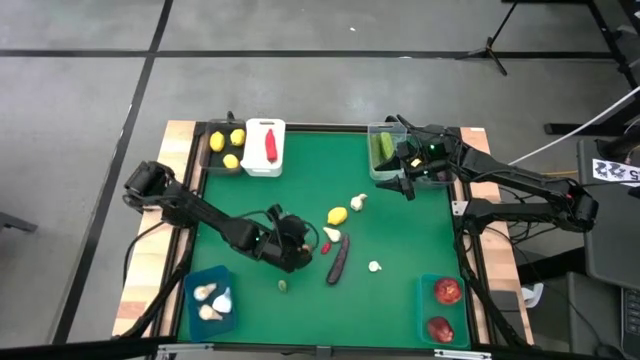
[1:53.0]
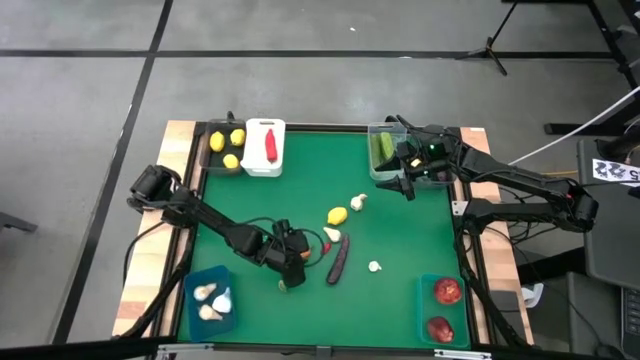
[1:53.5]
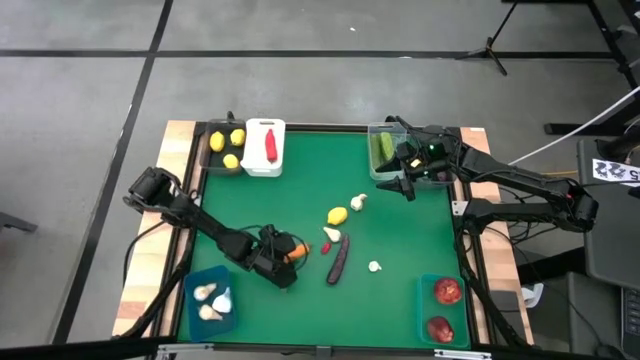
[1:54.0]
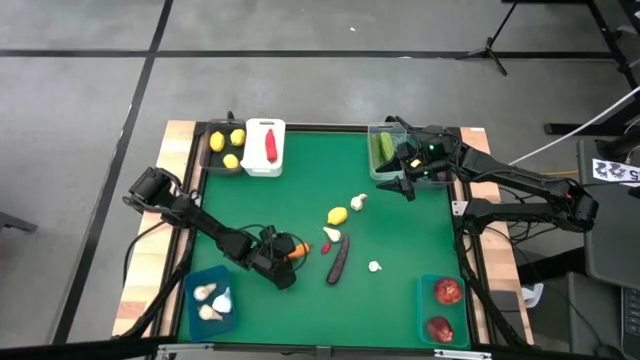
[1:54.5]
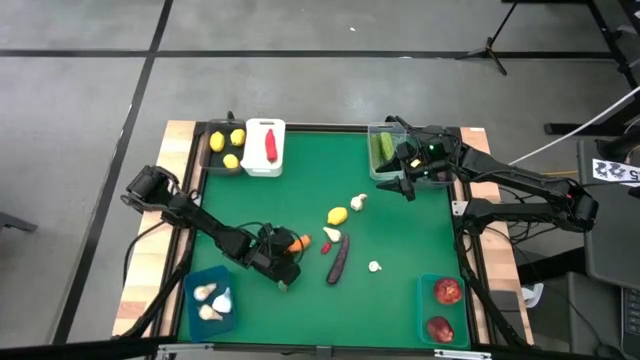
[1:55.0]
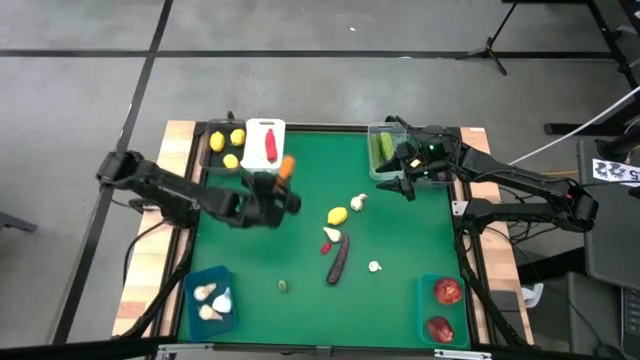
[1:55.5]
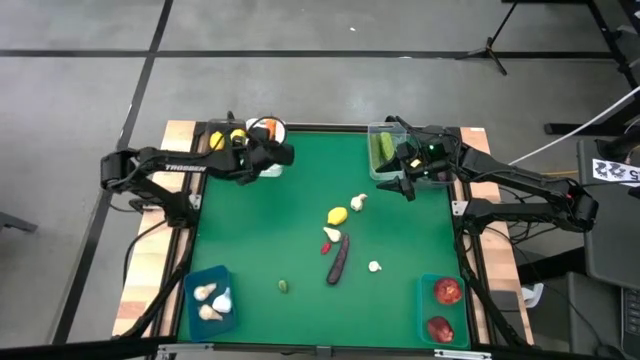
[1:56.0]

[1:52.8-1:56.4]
Task: Sort produce into baskets
Put the orange chili pepper into the white bin

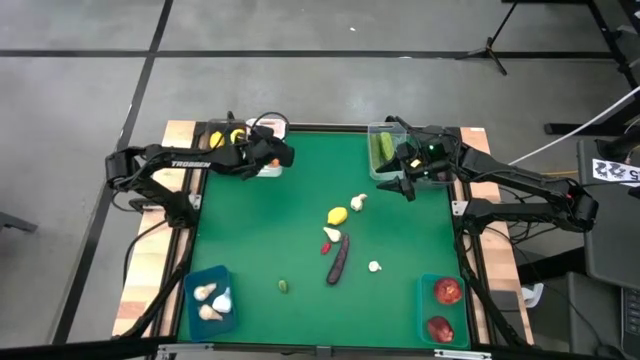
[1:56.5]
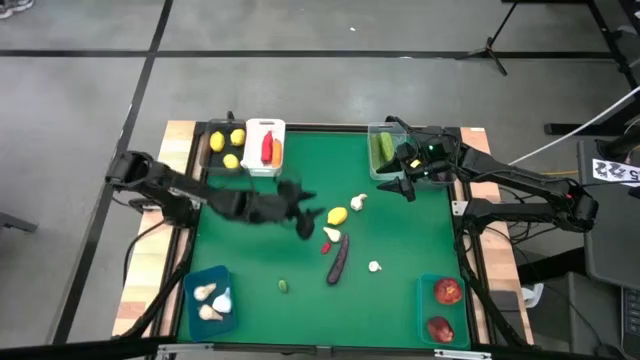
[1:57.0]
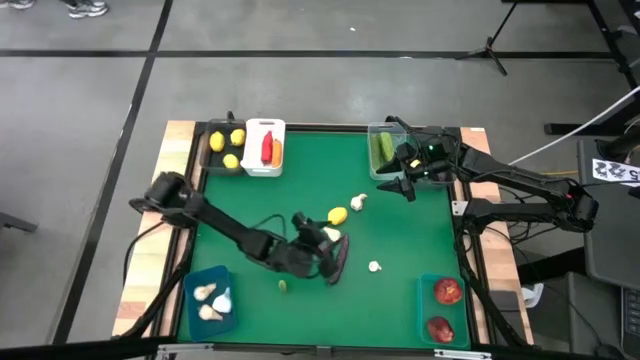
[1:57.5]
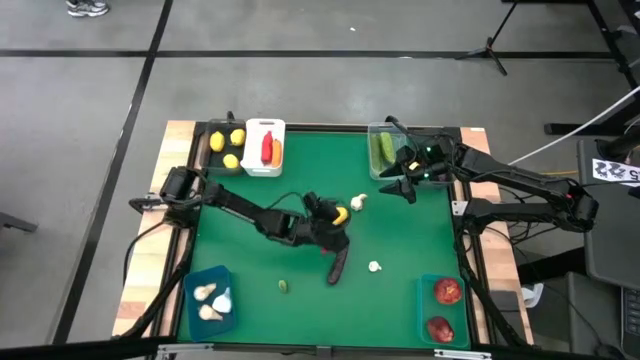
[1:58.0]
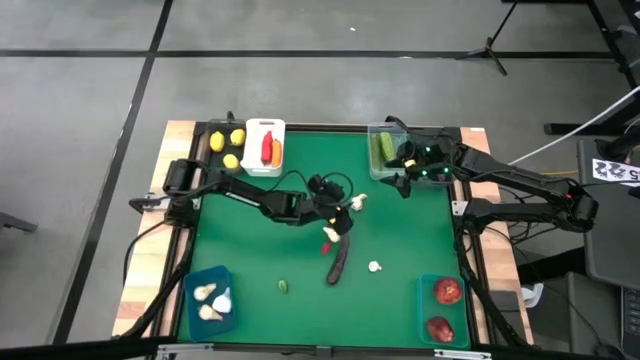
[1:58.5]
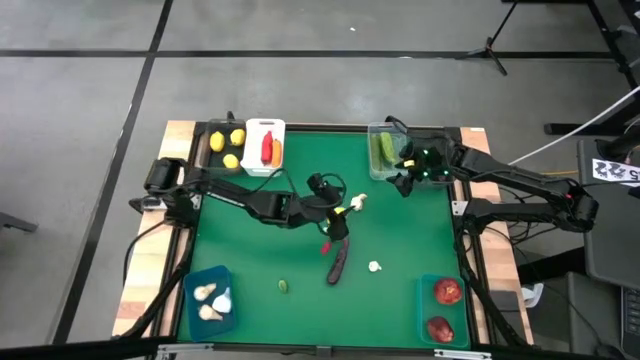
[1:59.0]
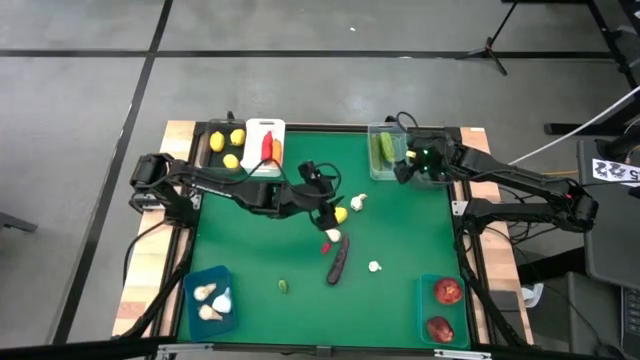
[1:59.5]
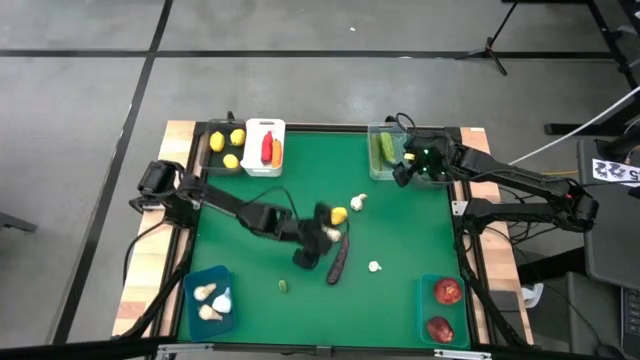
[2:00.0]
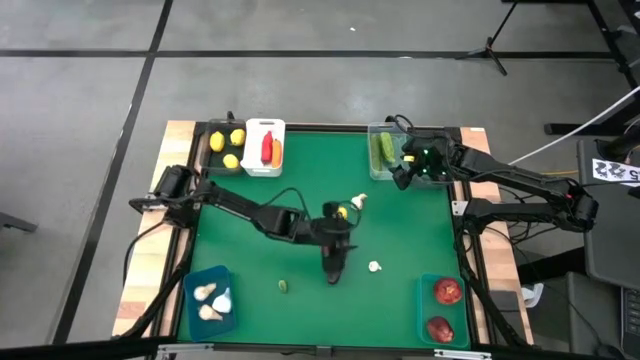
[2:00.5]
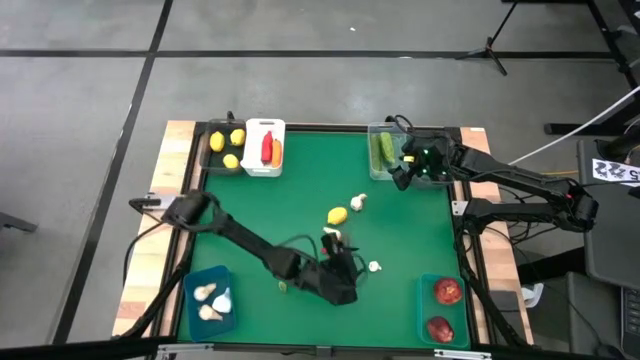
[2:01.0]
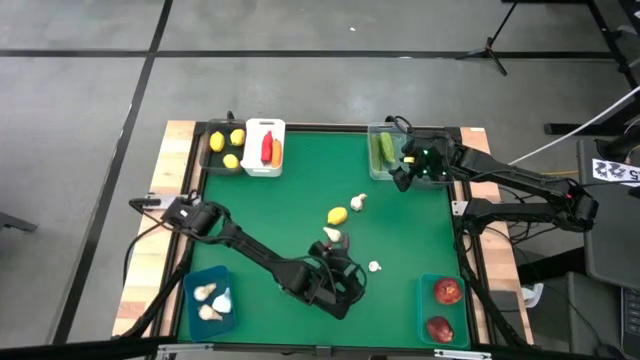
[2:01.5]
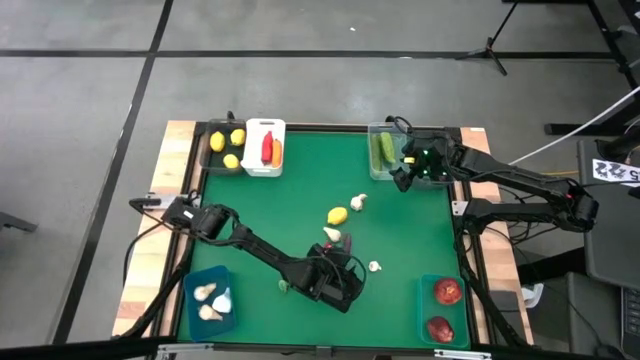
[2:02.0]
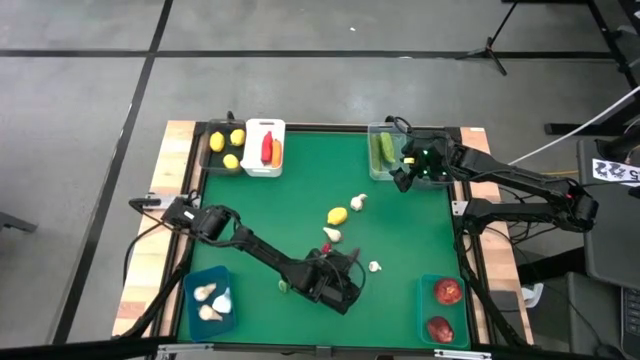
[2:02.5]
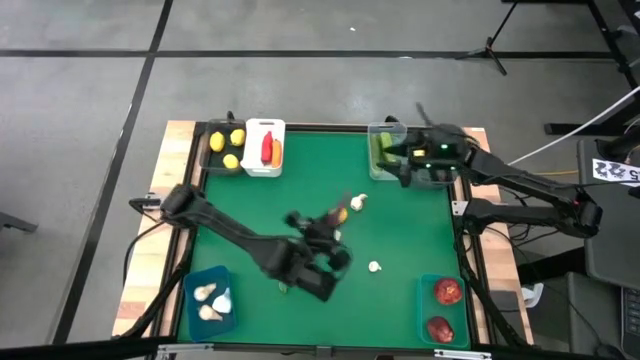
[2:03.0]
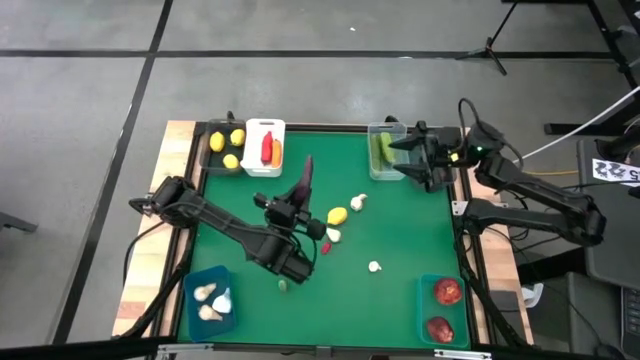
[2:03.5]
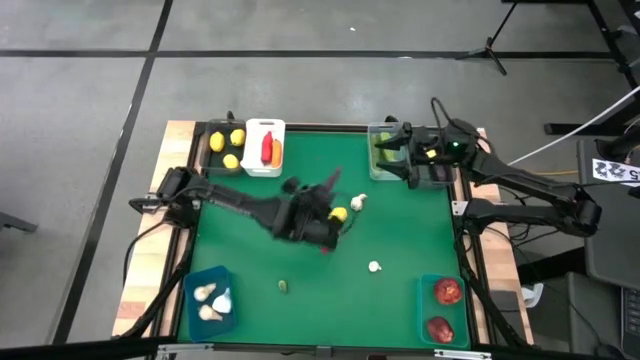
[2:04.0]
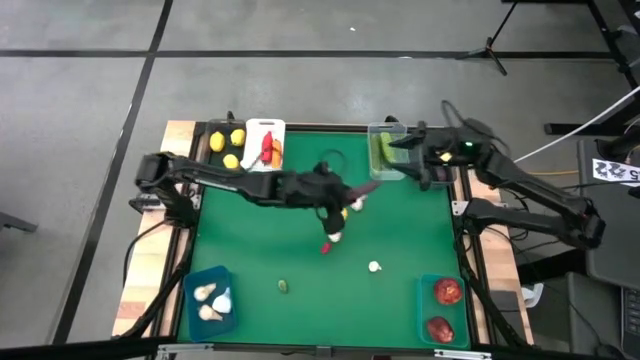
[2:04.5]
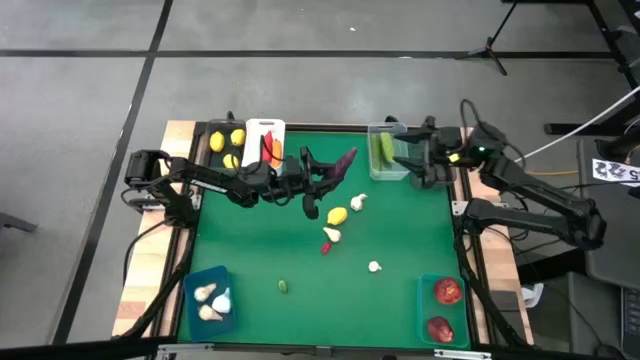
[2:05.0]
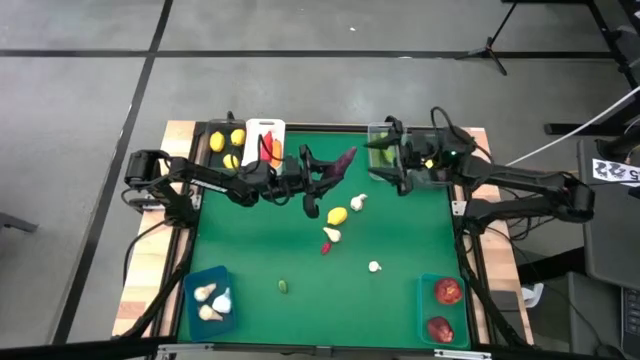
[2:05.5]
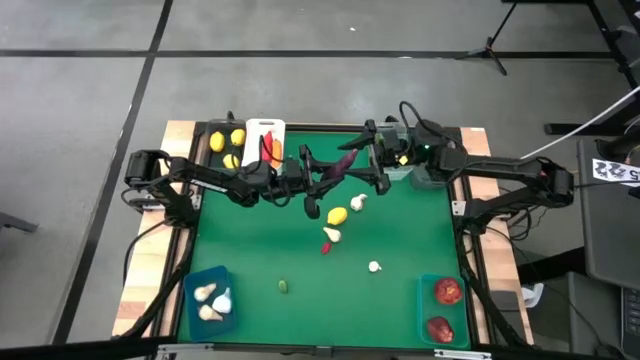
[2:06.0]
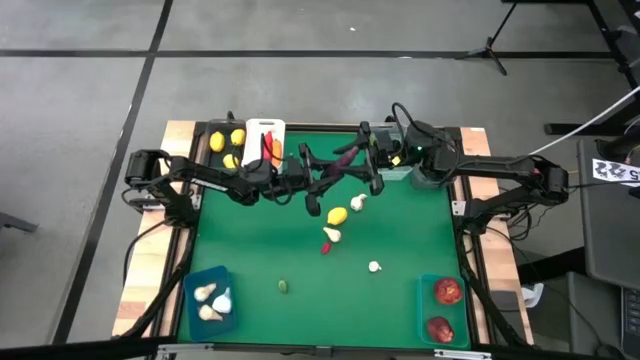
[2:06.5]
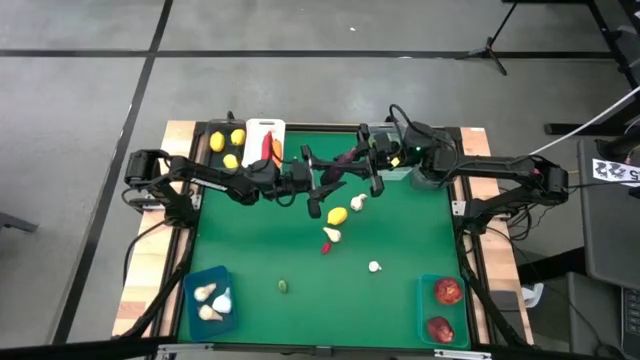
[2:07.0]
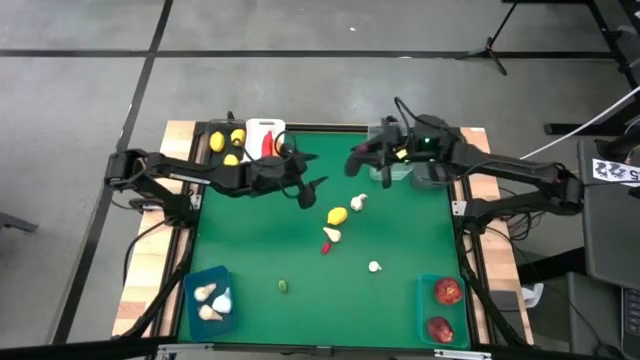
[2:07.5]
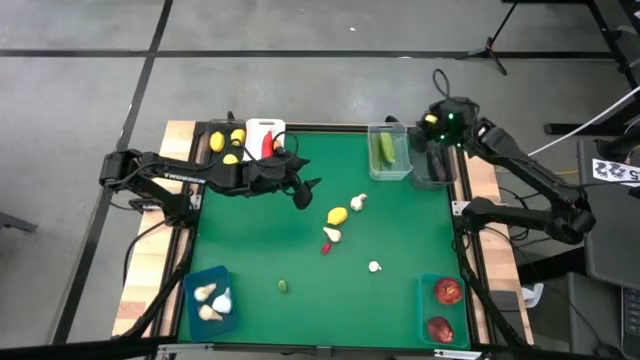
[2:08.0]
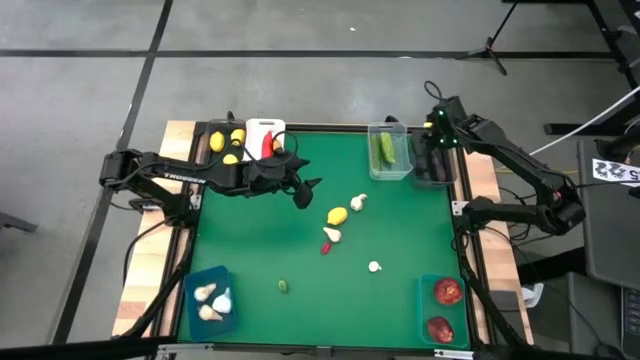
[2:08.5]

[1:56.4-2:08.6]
Put the eggplant into the right black bin

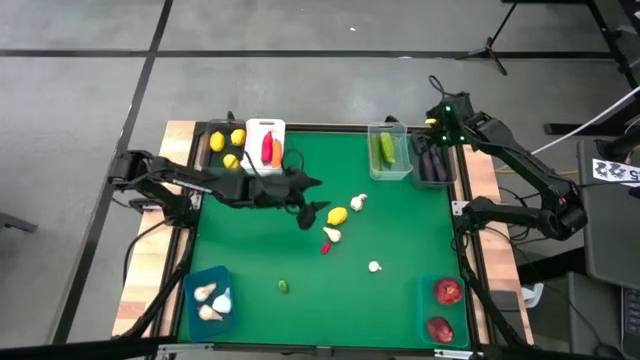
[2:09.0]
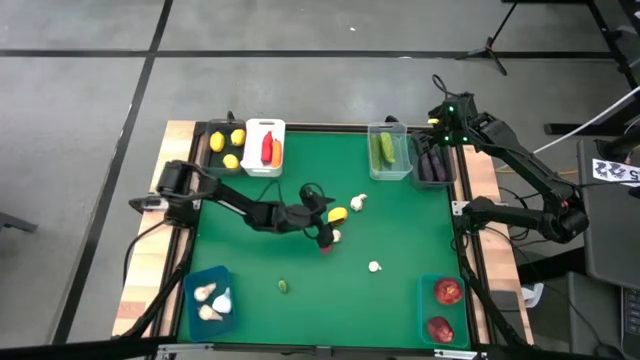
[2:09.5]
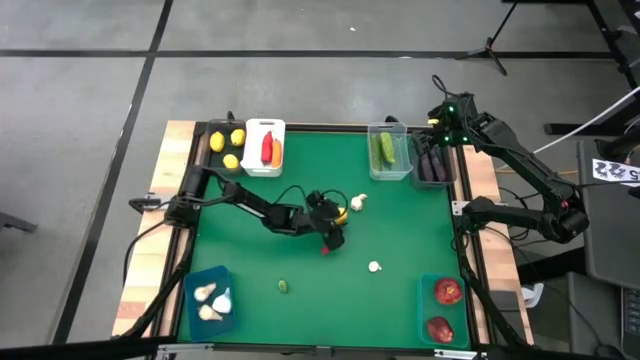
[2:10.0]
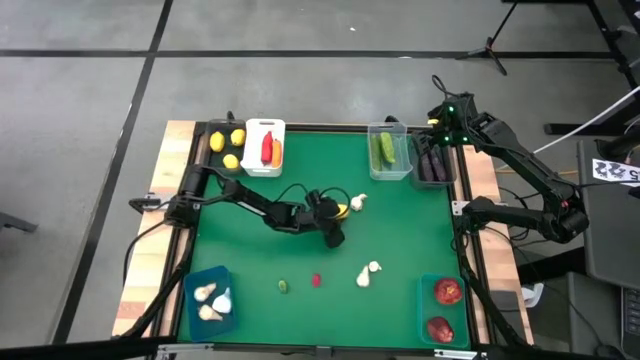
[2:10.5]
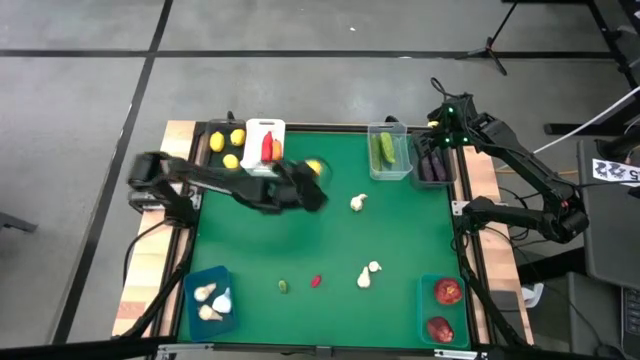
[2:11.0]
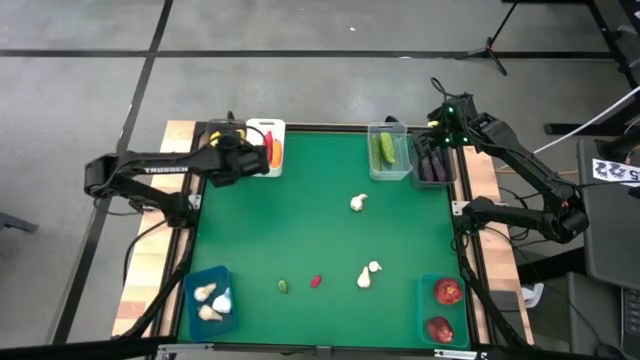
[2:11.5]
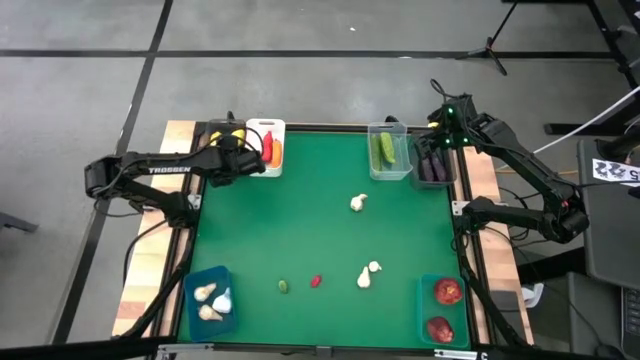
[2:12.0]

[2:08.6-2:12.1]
Put the lemon into the left black bin
